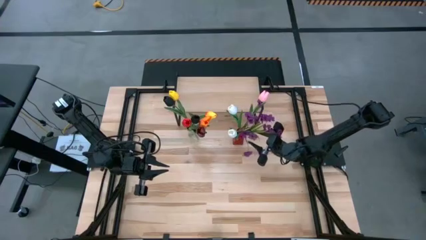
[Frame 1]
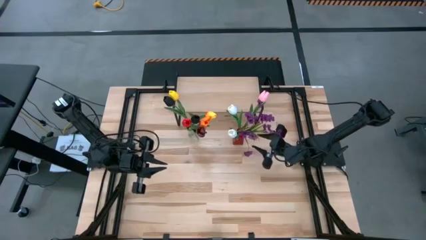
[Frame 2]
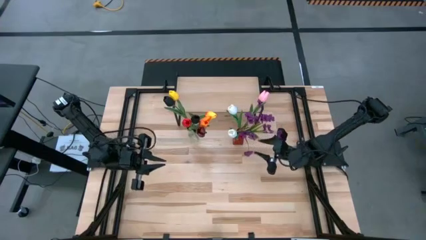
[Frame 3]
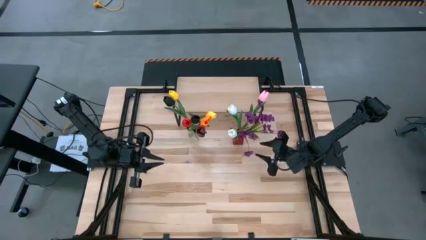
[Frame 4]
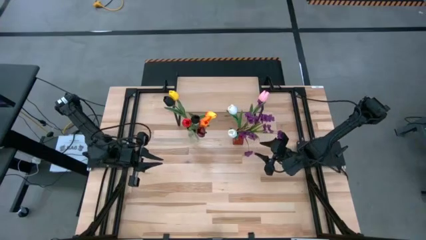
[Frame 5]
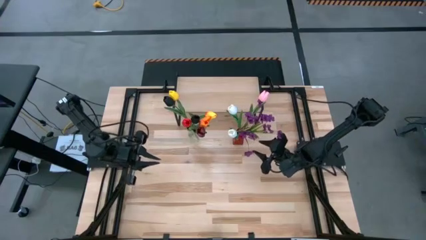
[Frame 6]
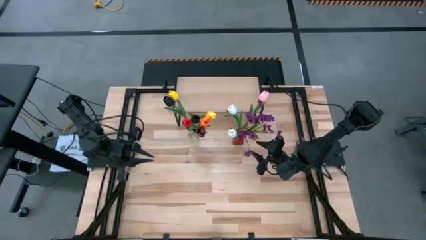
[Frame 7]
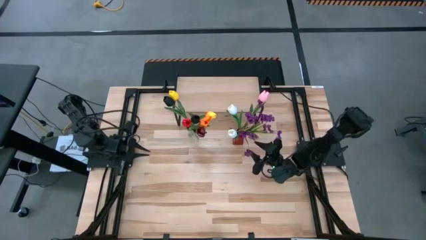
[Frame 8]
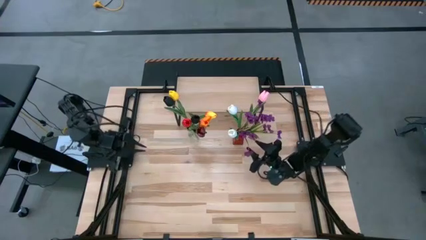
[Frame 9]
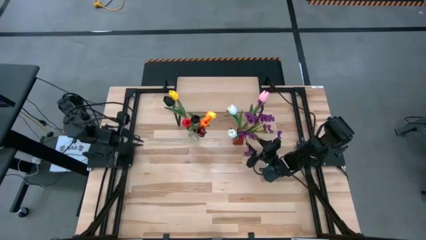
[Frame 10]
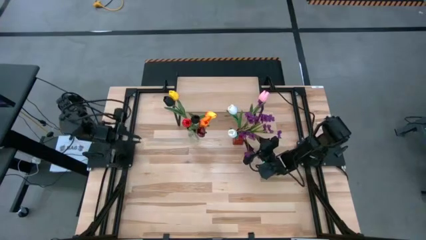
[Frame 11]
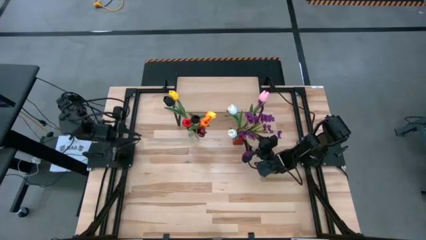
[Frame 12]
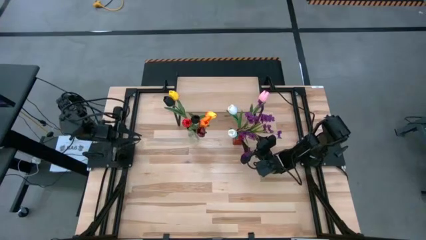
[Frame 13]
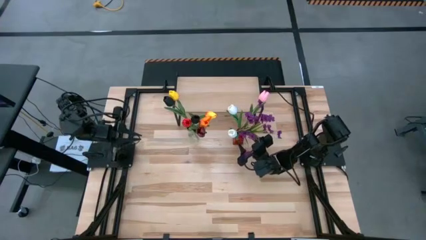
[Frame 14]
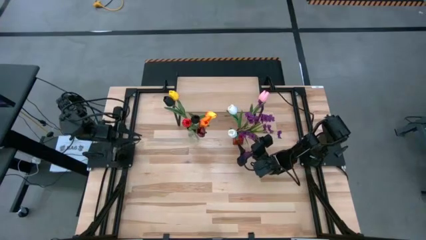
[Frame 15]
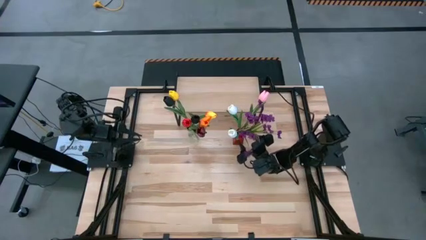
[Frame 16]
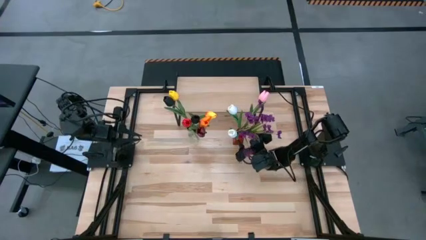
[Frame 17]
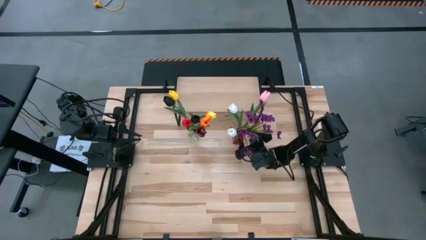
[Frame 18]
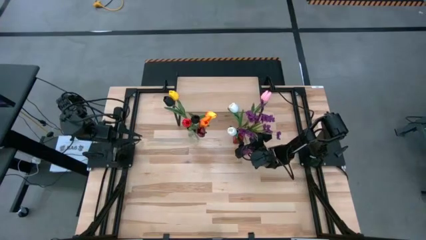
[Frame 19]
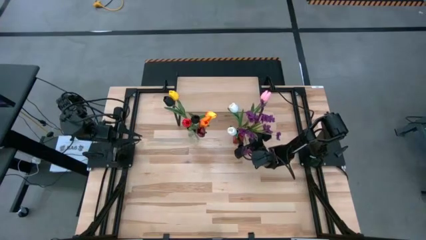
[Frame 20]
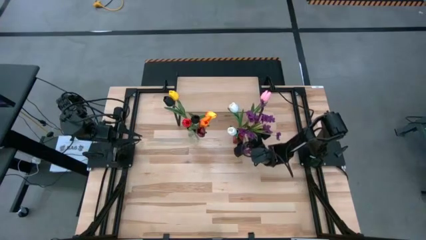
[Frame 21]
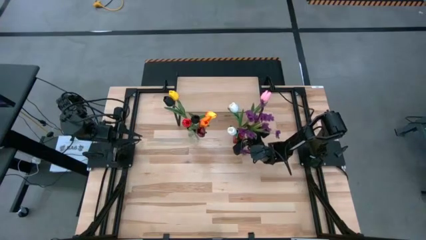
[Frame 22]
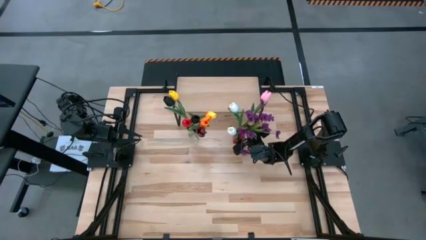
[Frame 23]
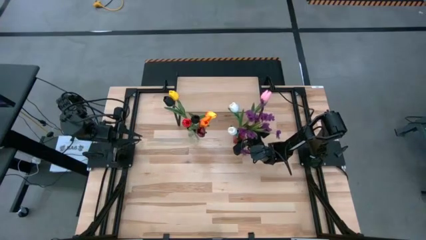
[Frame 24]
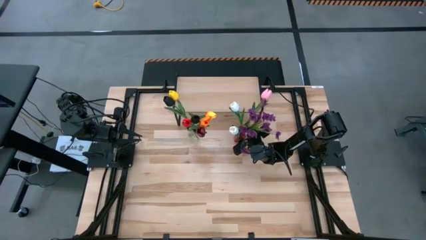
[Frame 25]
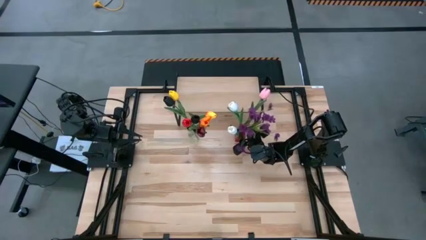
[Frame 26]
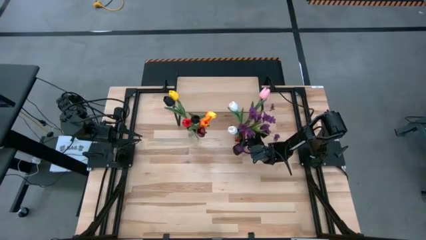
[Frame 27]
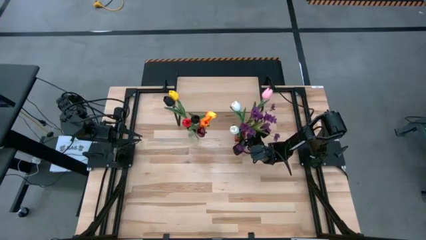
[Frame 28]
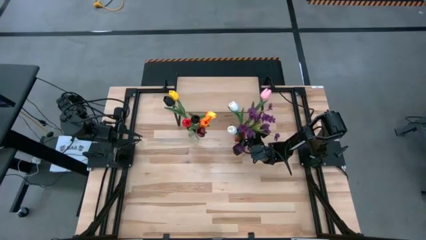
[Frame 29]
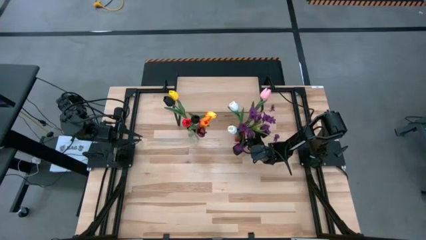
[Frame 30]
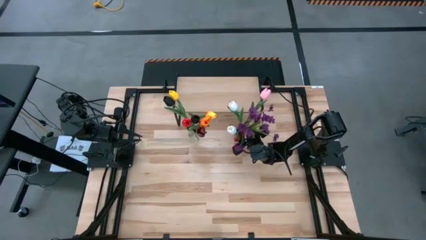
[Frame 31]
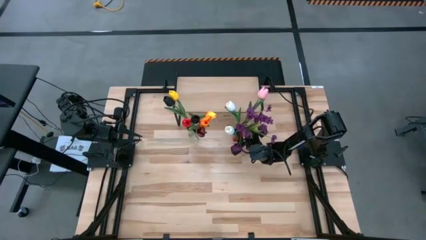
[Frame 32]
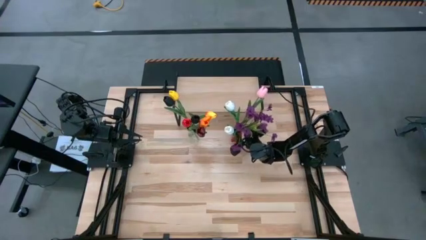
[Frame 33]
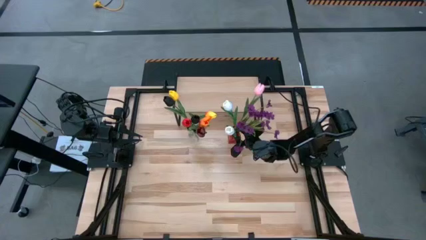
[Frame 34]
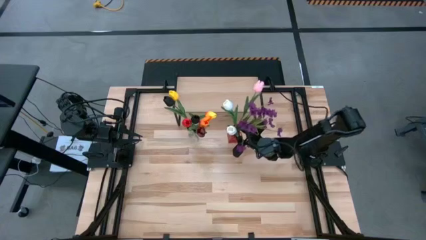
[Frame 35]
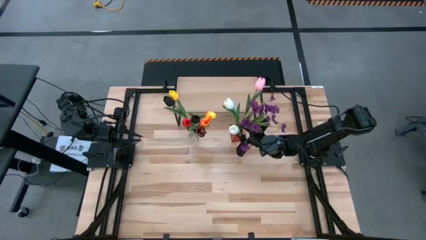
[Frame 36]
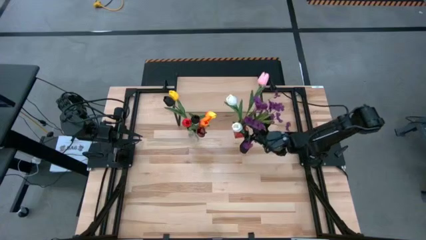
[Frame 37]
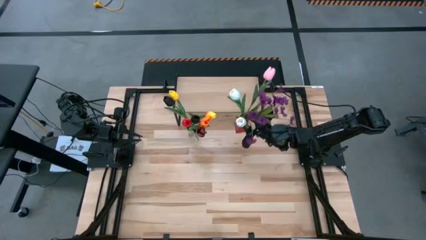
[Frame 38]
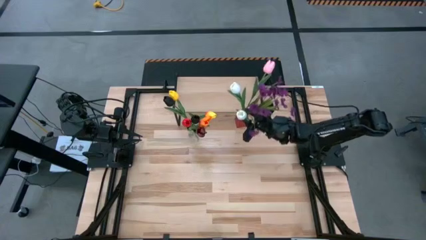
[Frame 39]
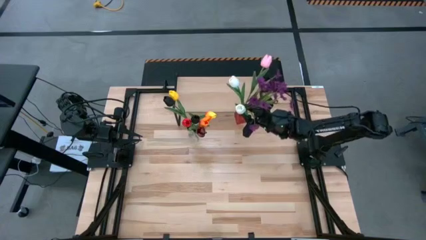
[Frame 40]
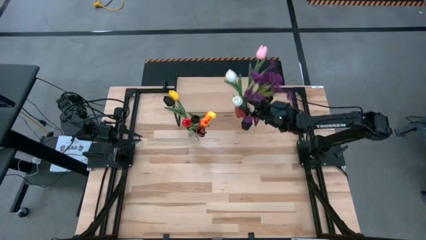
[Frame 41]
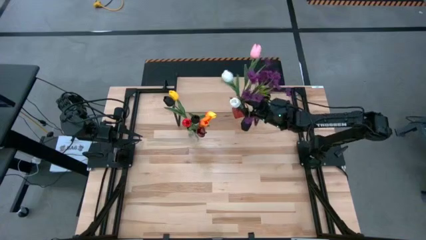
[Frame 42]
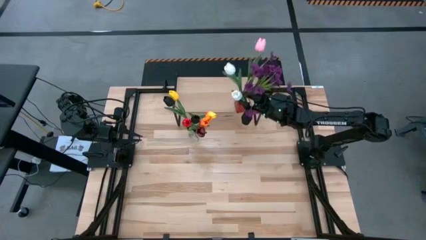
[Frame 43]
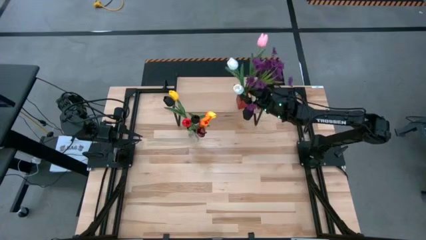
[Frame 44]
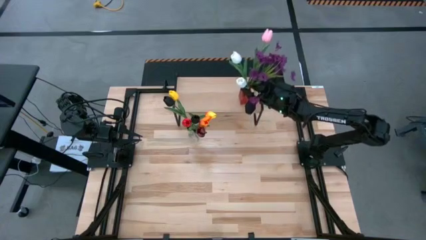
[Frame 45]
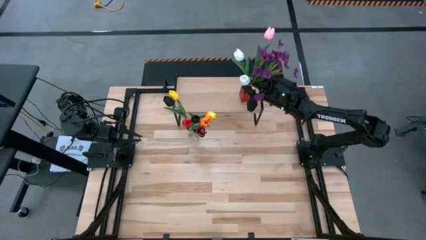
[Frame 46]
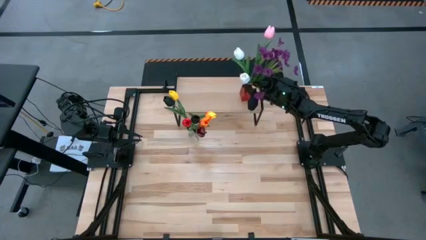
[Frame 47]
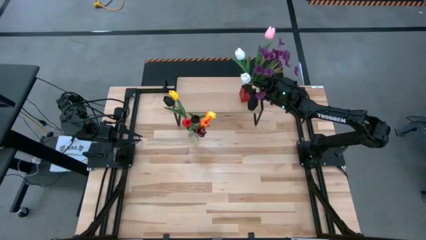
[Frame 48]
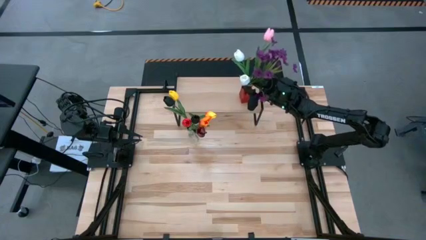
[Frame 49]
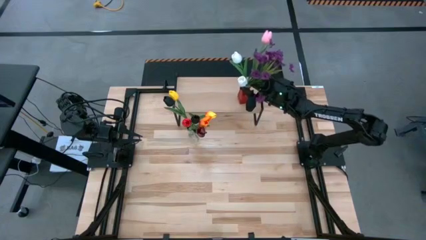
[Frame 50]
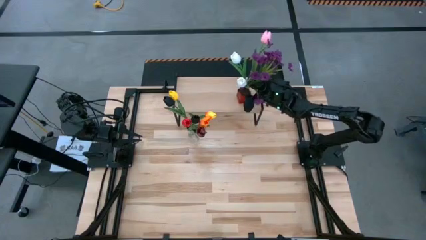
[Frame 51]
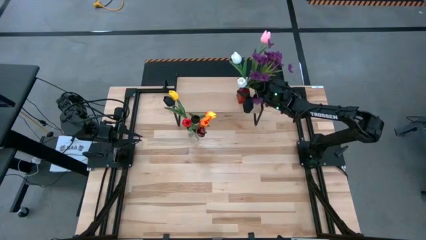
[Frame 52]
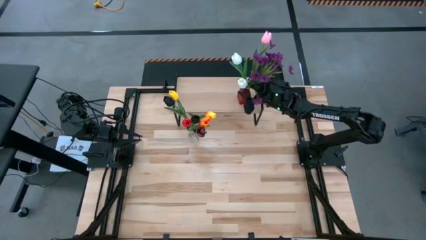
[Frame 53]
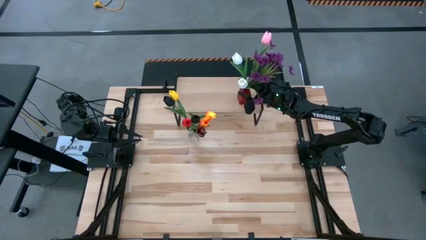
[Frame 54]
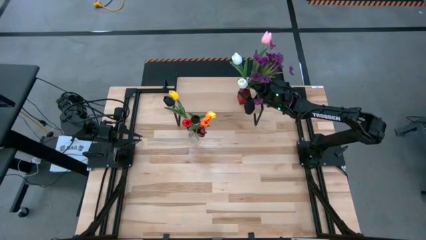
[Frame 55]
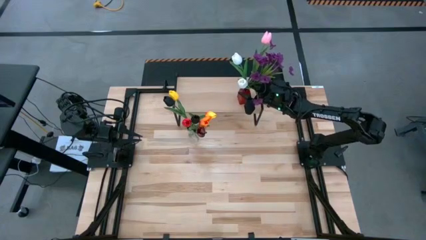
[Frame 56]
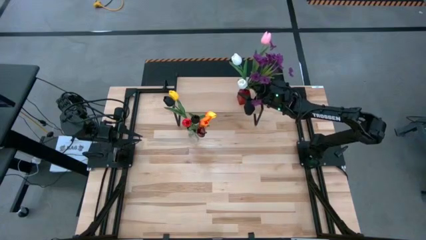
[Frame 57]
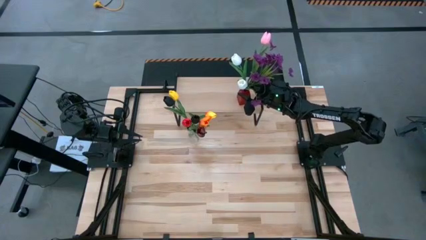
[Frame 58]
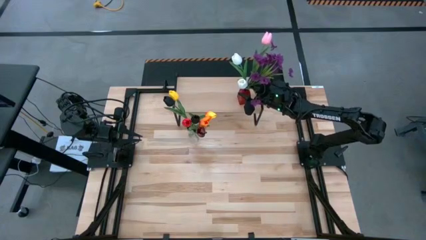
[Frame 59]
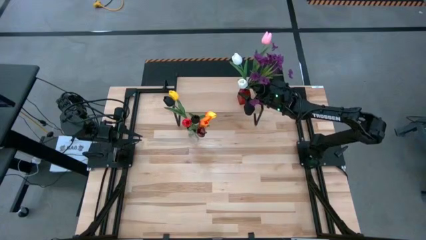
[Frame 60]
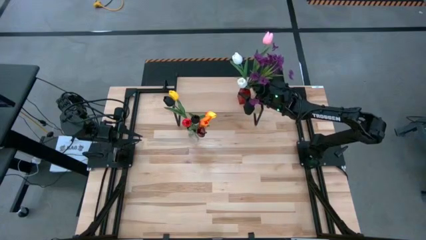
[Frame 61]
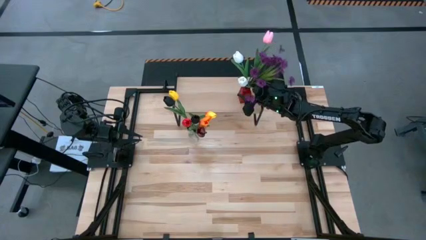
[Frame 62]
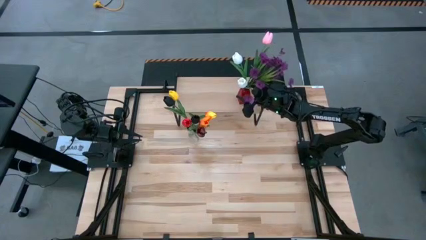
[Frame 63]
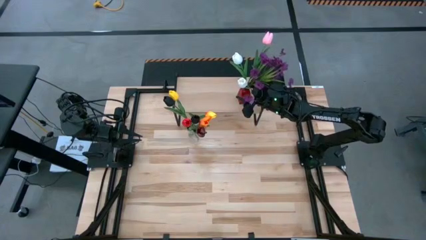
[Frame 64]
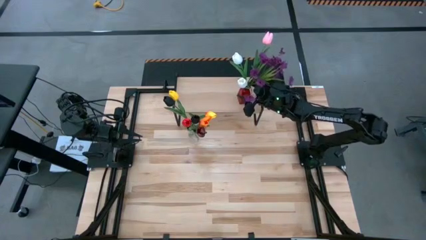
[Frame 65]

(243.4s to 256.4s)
Task: Pick and place flowers into a vace then onto a shelf
Put the red vase with flowers on the shelf

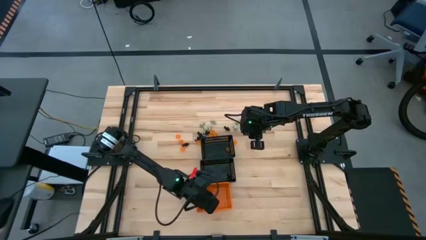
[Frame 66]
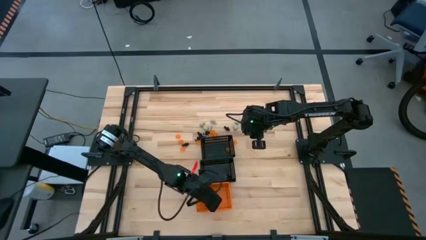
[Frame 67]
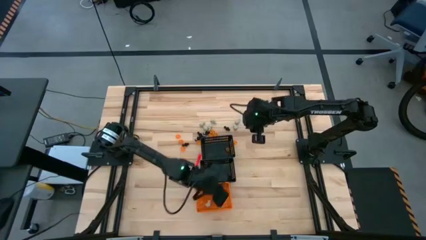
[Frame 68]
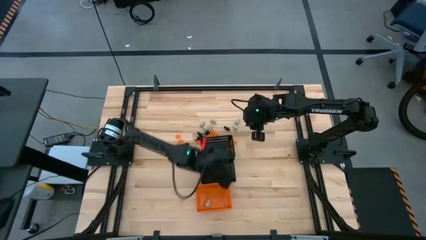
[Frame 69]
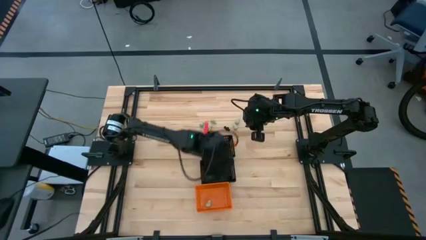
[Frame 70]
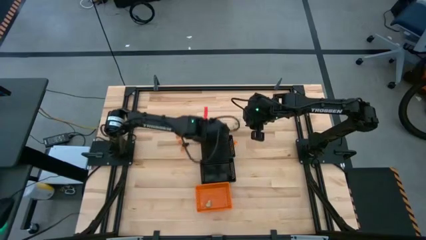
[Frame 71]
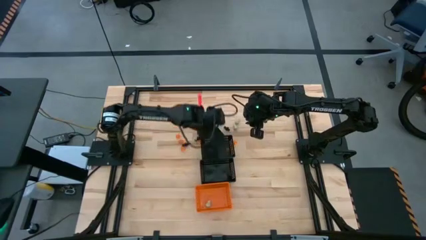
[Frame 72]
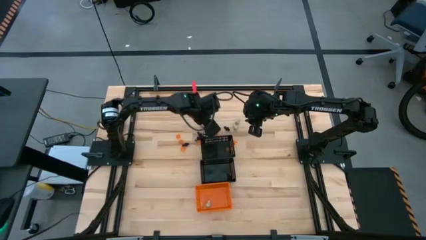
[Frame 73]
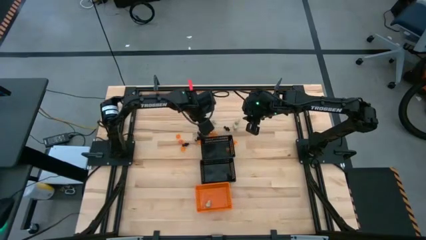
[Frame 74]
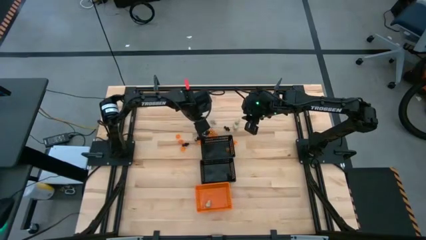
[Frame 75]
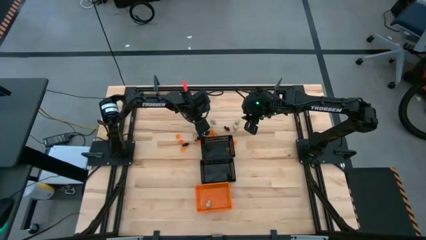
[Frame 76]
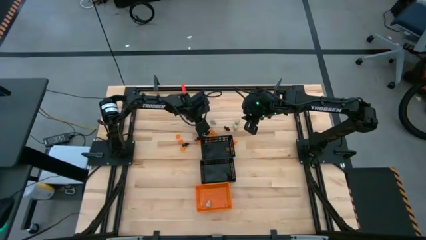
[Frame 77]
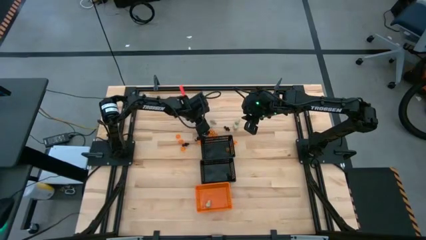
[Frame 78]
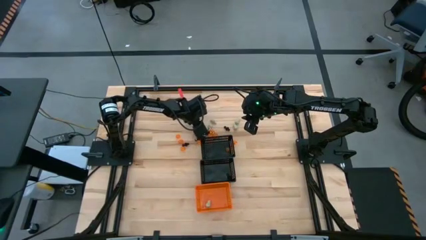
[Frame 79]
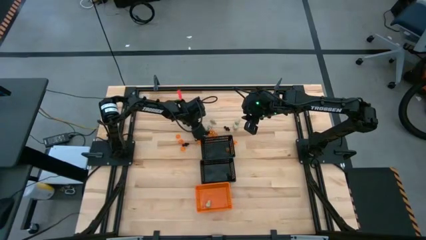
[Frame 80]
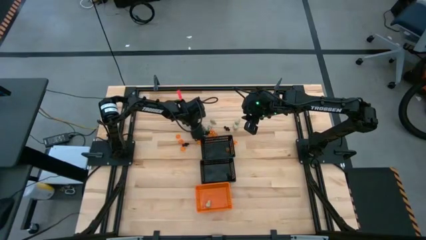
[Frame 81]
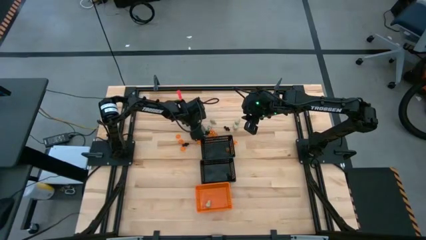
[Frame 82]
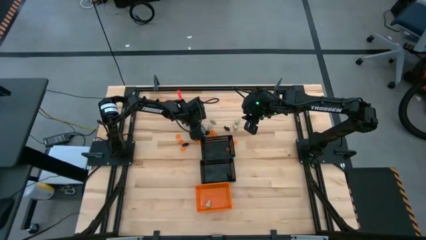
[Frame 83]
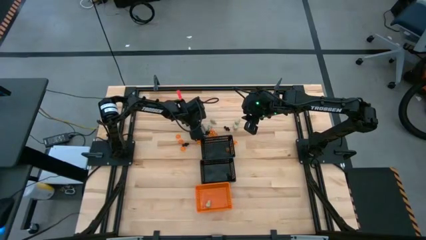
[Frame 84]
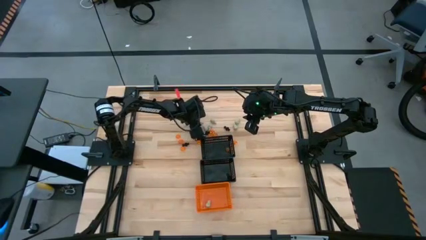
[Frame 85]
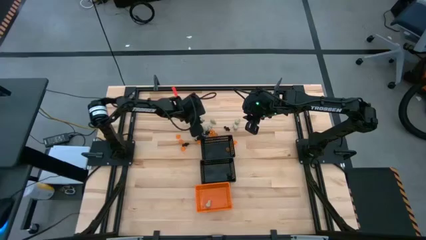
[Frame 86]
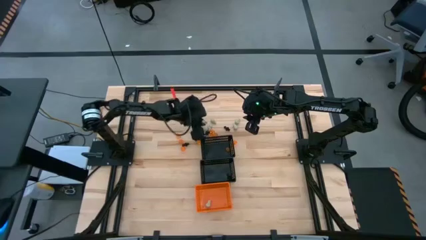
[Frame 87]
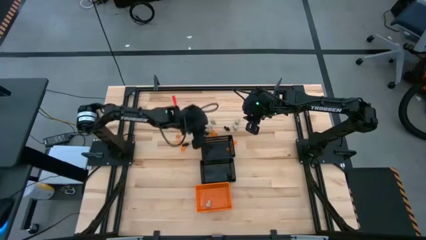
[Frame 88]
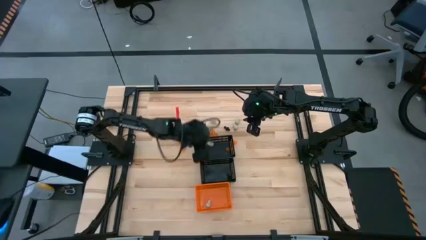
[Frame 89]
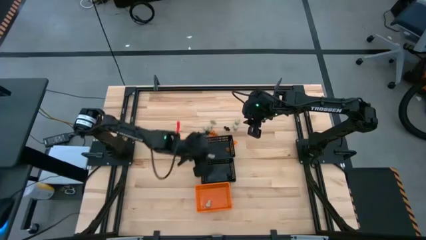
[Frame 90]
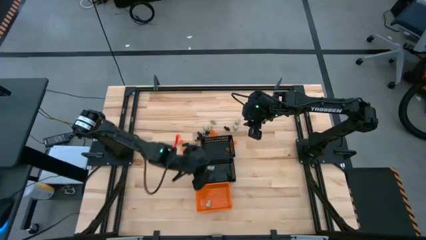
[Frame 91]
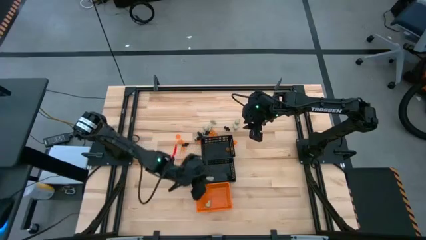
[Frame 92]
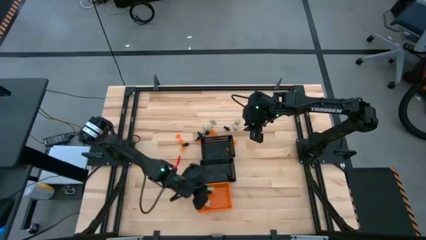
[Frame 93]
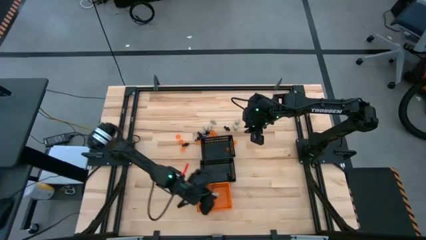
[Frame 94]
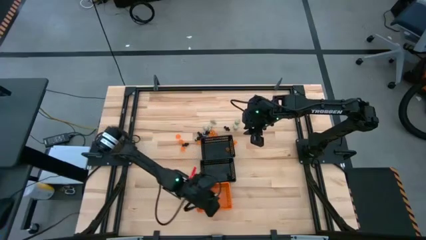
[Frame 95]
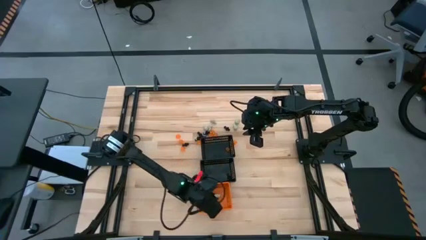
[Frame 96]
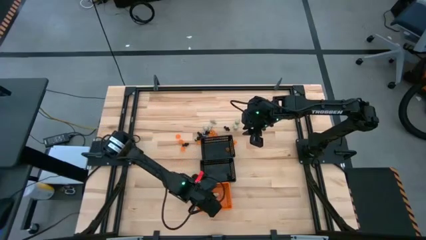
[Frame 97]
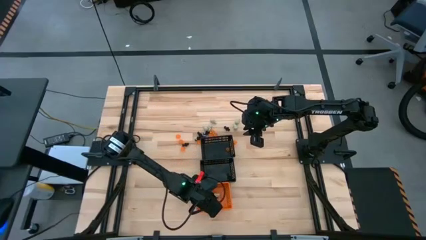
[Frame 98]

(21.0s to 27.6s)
Task: Sort Halloween decoration
Put the white skull toy into the orange bin
